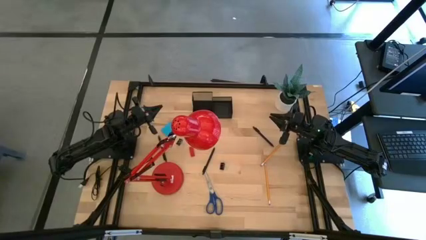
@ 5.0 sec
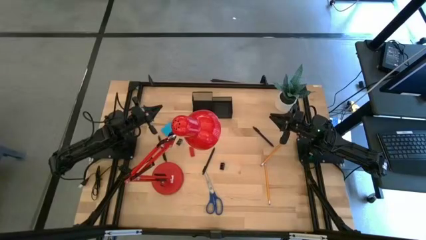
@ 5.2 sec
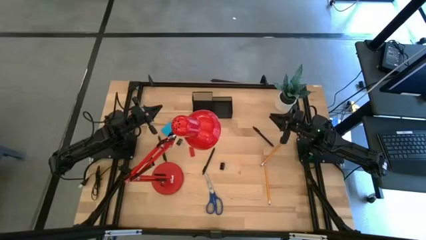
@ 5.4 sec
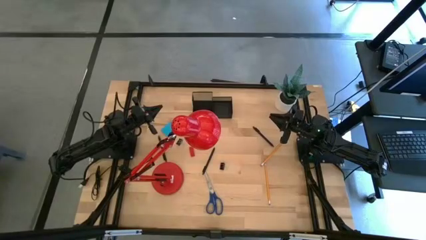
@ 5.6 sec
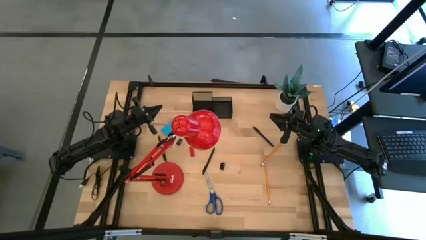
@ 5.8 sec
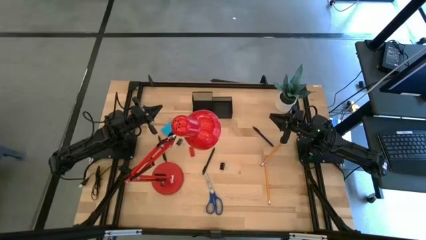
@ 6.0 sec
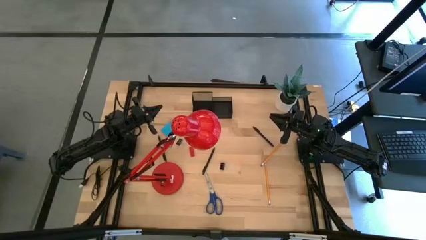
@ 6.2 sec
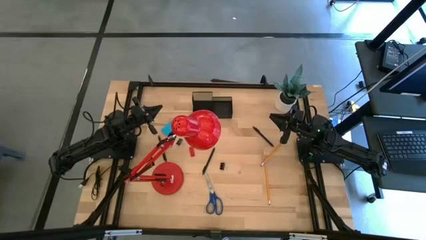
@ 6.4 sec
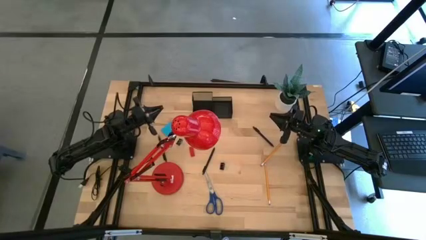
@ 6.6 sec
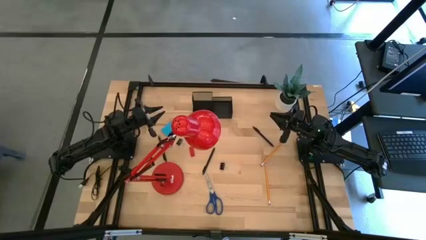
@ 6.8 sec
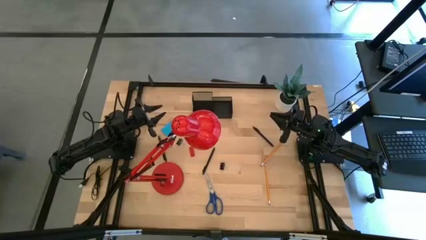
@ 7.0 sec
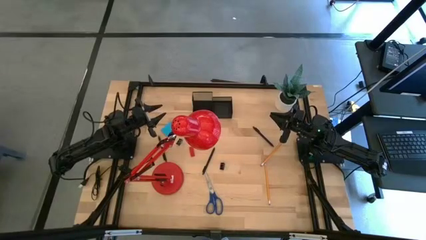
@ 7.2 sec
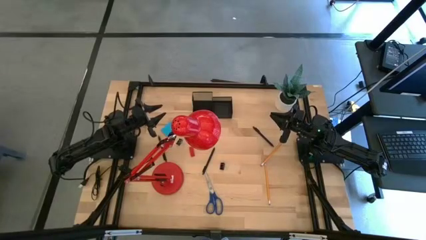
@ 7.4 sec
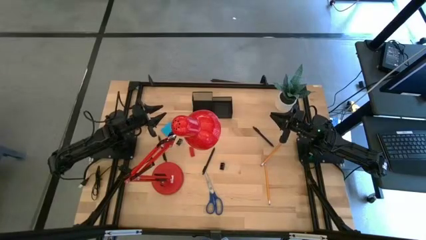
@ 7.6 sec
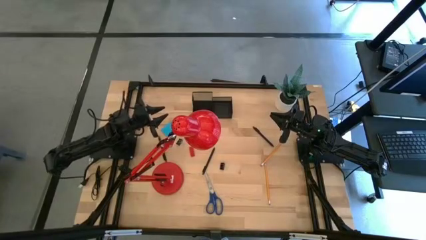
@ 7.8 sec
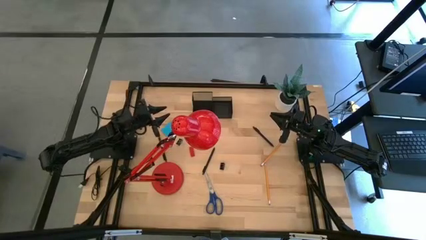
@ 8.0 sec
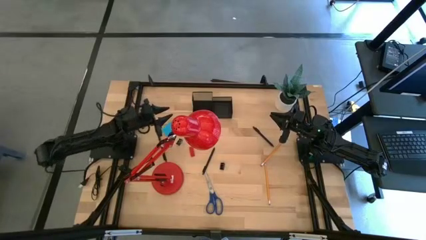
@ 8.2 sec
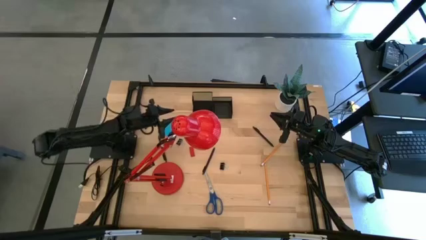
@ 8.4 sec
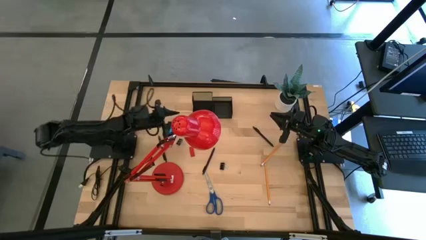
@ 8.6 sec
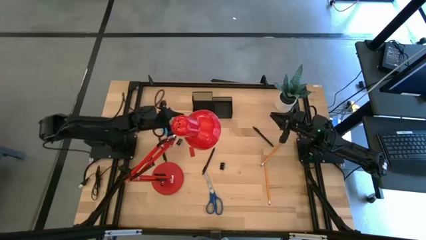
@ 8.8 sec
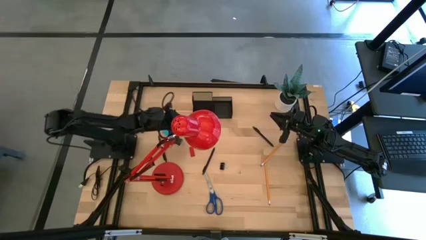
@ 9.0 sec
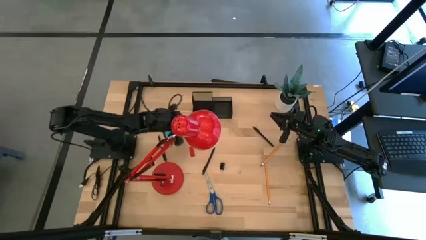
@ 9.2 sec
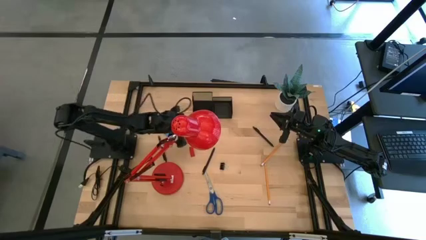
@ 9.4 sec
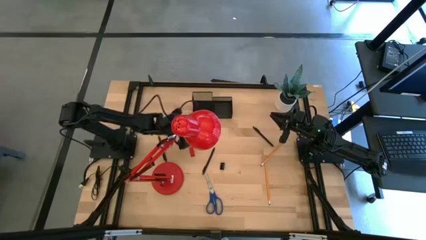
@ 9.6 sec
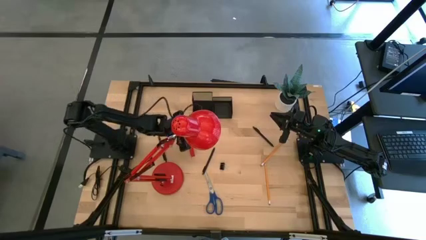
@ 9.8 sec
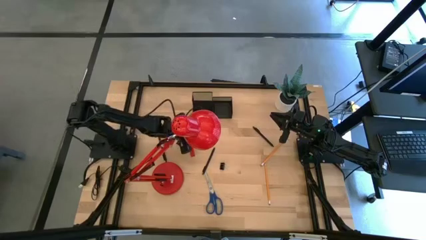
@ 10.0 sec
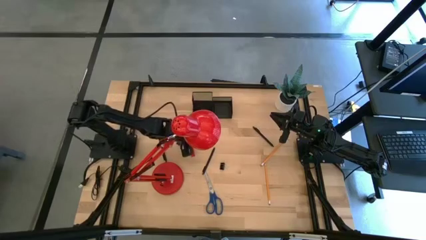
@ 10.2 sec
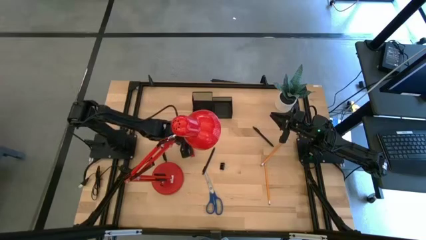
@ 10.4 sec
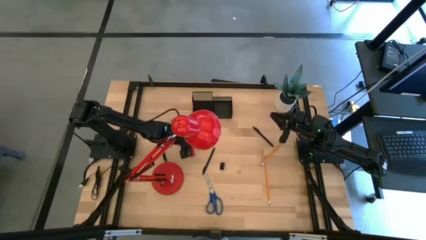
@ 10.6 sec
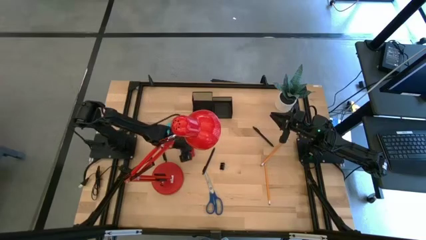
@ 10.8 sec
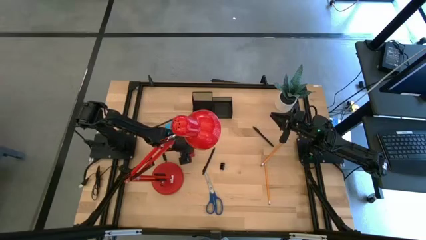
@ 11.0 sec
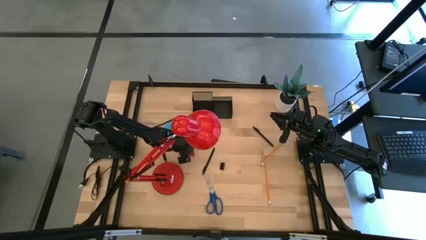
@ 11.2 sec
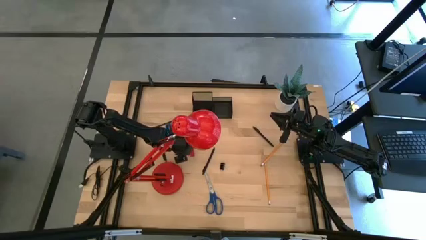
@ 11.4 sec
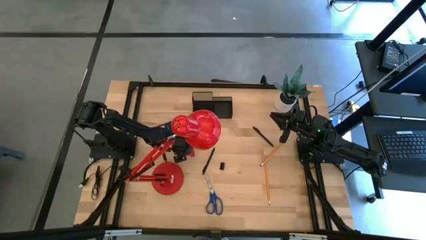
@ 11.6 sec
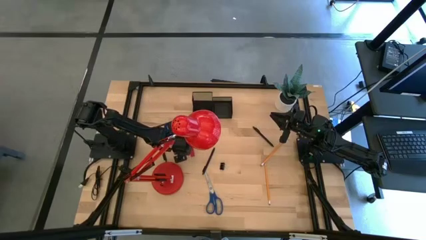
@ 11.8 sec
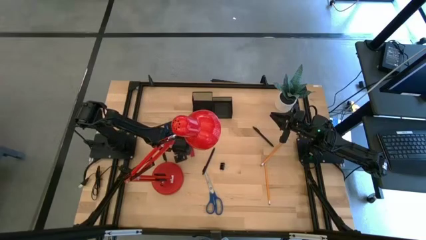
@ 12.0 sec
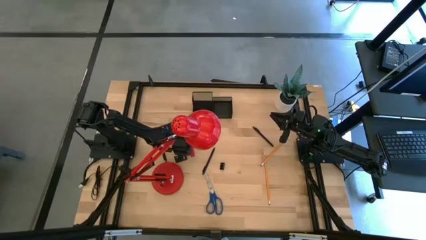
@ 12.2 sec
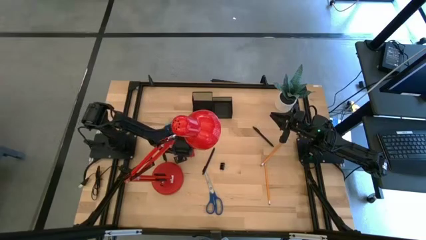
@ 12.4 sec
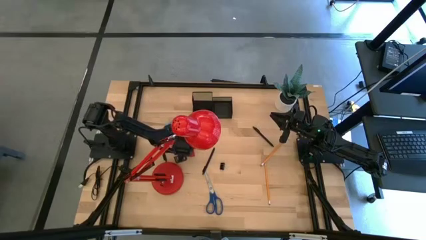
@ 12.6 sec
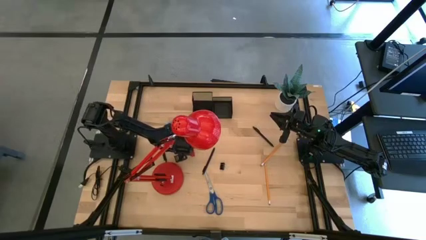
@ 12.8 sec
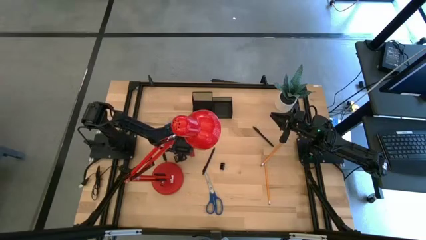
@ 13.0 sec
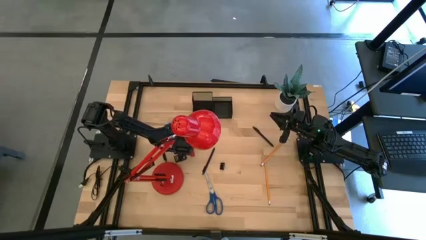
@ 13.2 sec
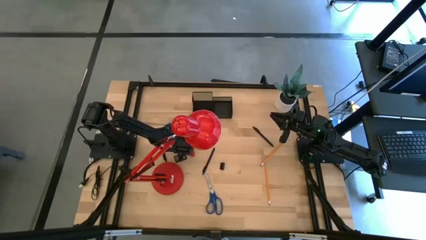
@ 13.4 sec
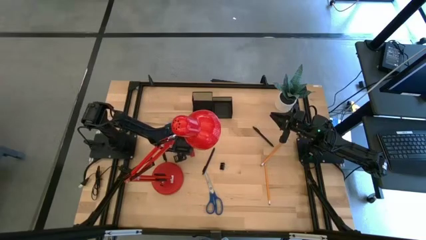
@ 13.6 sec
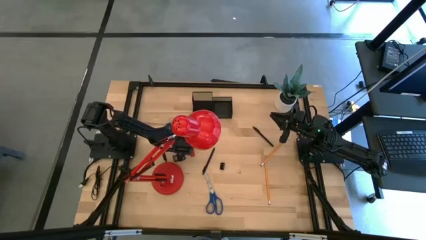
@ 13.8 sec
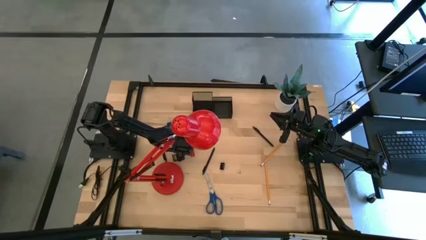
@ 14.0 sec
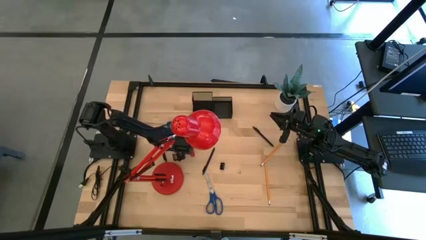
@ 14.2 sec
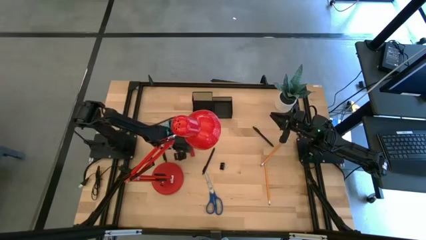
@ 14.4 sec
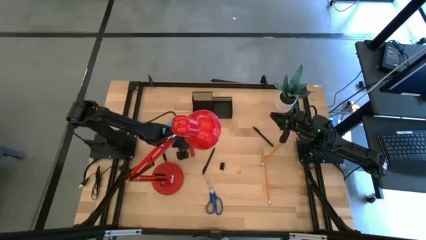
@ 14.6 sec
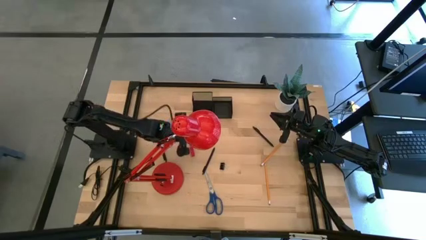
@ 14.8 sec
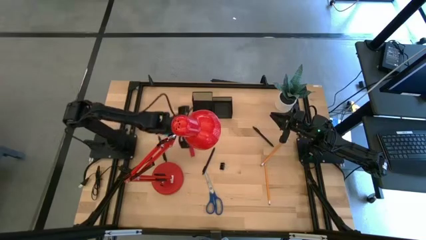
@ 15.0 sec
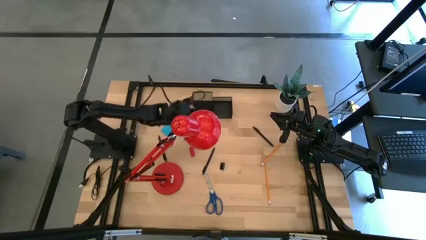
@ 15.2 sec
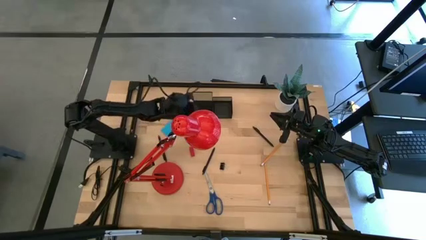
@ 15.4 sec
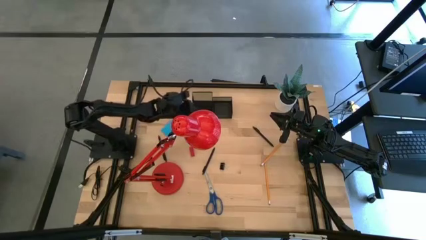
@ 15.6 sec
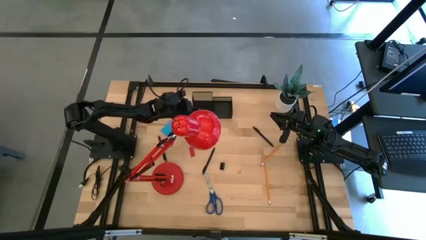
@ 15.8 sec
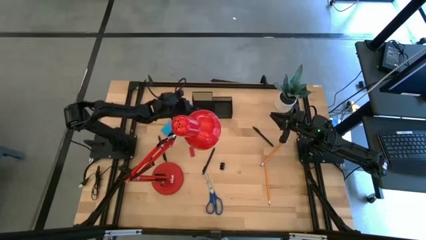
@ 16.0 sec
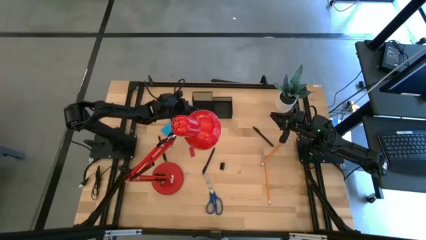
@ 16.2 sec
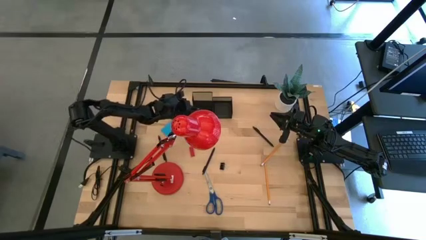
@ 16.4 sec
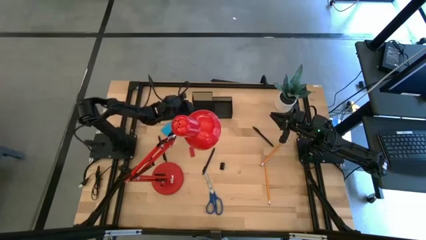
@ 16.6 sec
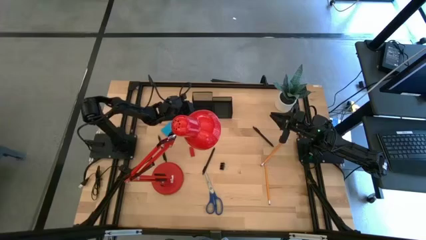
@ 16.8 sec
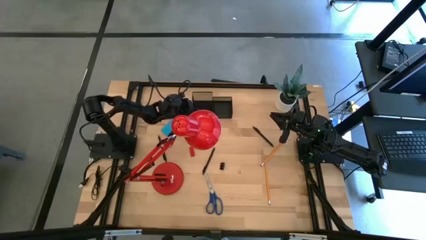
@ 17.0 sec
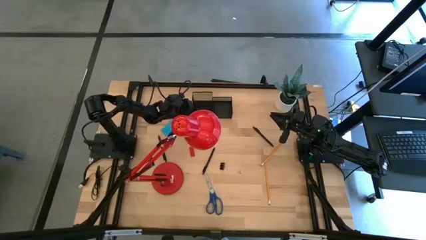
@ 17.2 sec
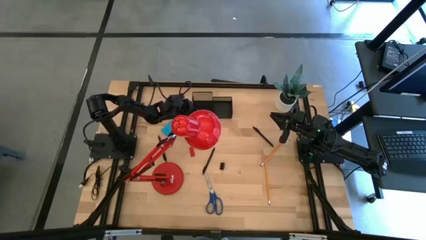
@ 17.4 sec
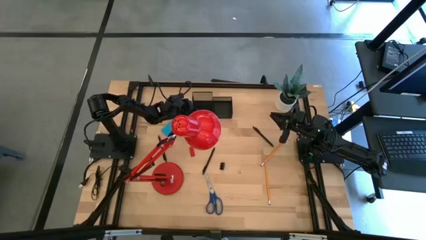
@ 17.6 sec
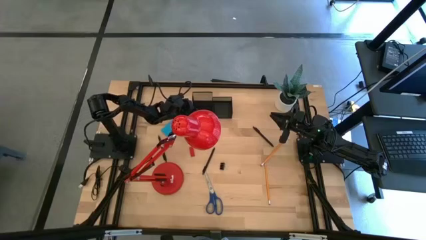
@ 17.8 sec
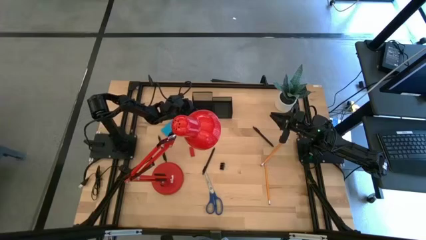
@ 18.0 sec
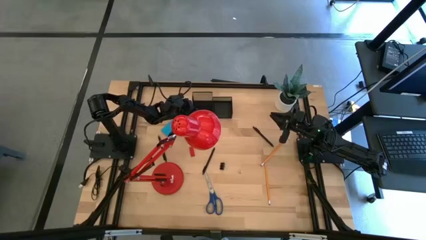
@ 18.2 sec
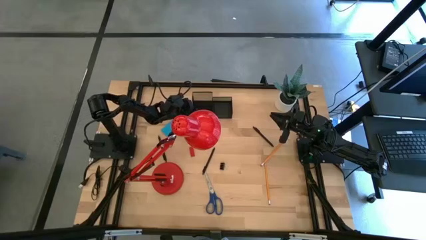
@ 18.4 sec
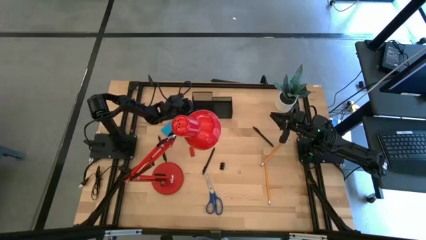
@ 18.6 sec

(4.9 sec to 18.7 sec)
Task: Pick and place office supplies into organizer
Put the top left binder clip into the desk organizer
